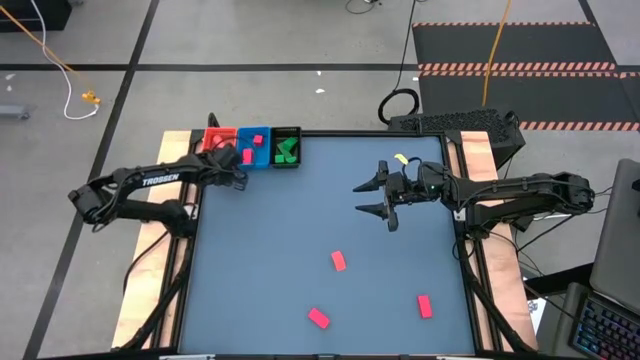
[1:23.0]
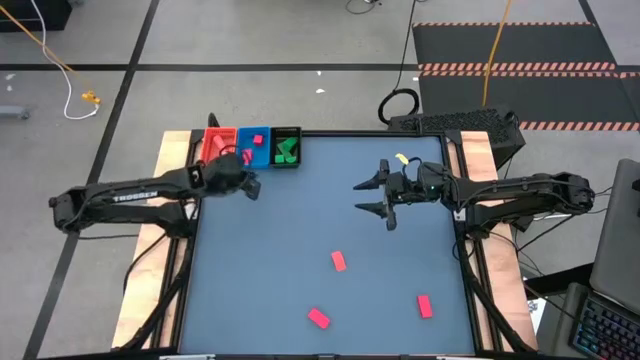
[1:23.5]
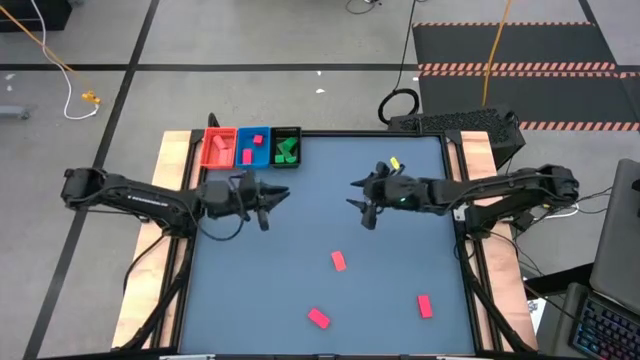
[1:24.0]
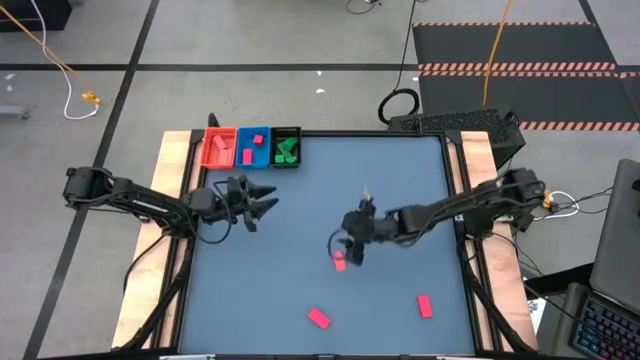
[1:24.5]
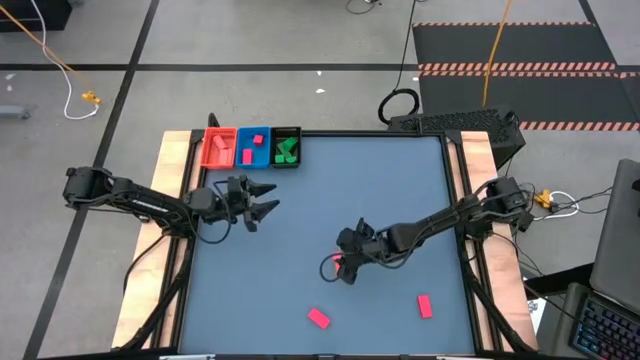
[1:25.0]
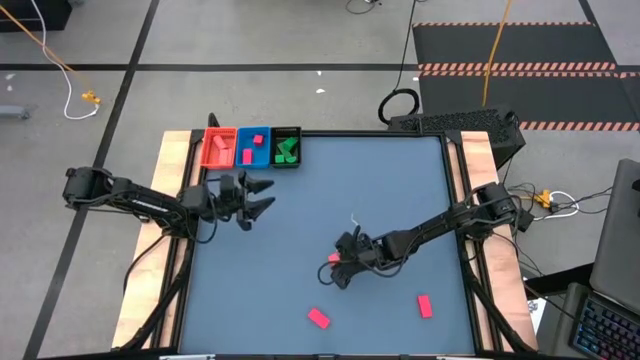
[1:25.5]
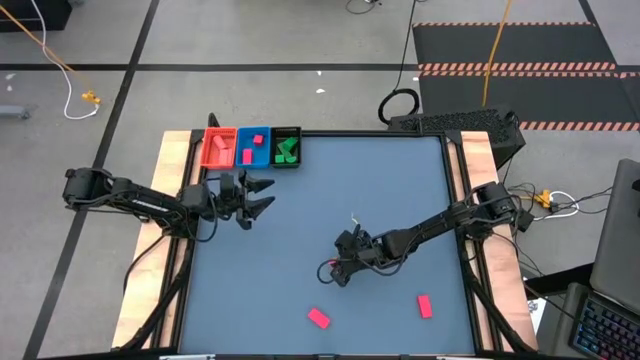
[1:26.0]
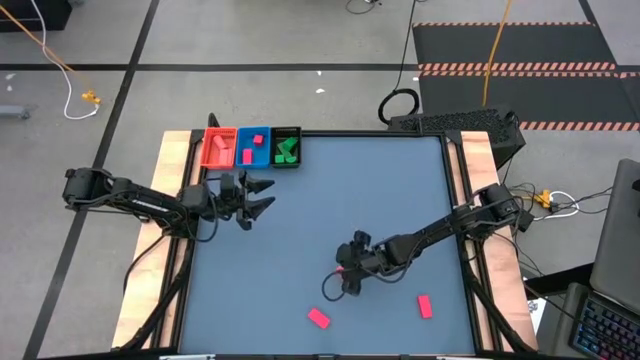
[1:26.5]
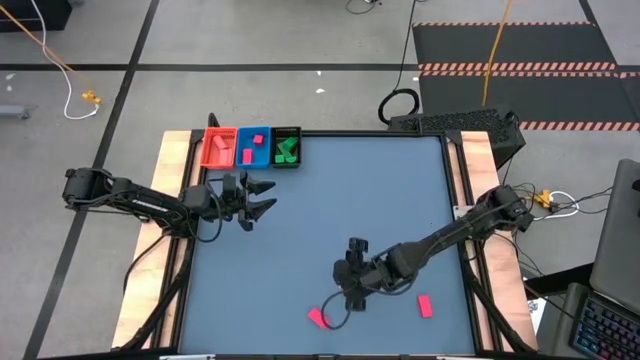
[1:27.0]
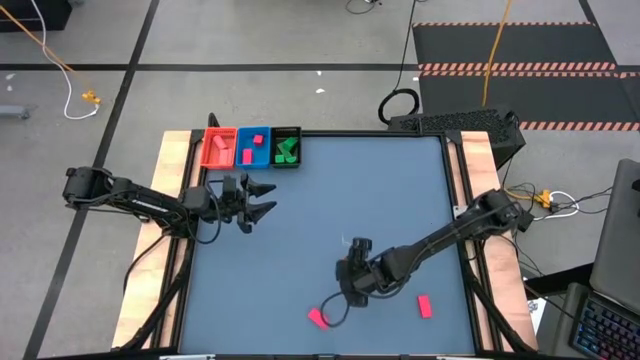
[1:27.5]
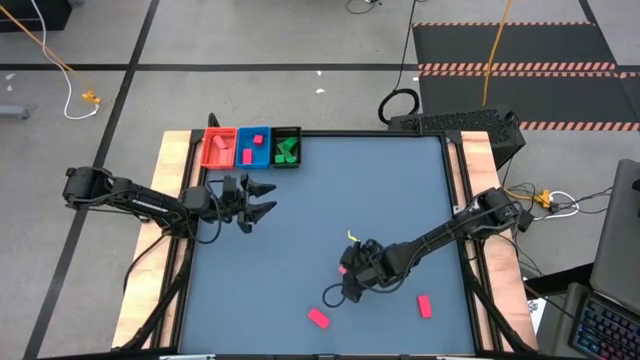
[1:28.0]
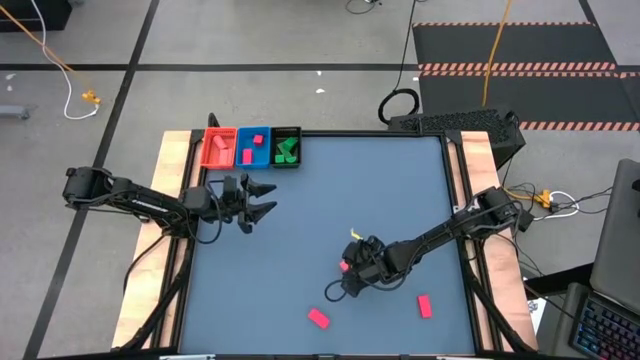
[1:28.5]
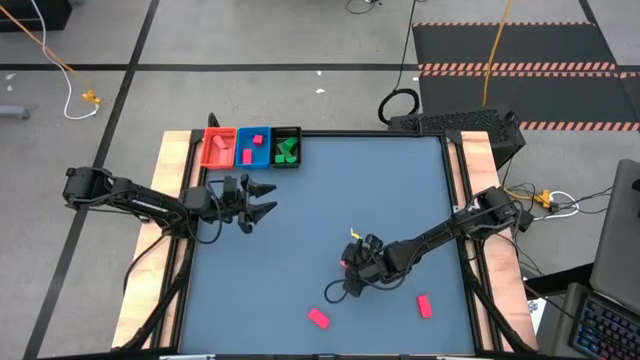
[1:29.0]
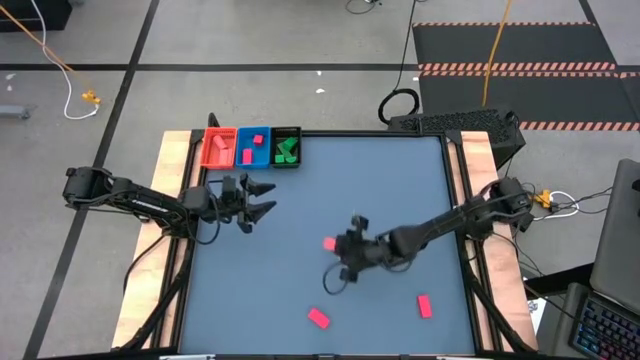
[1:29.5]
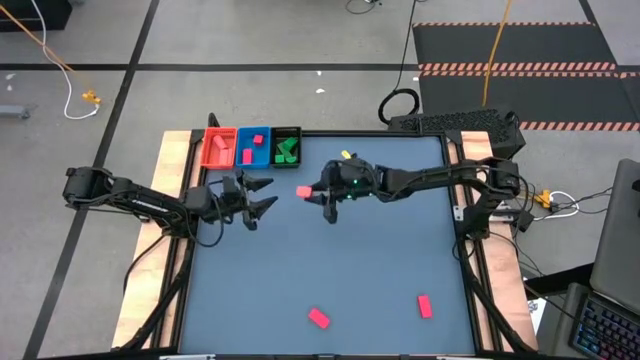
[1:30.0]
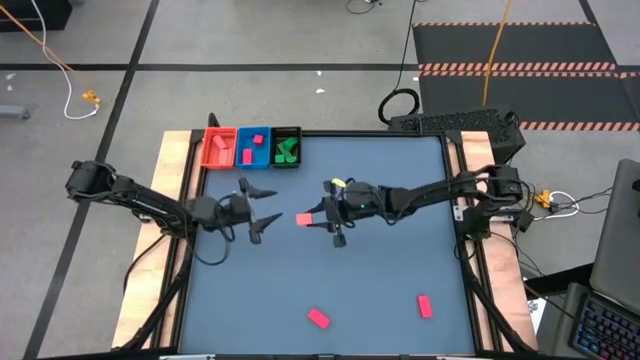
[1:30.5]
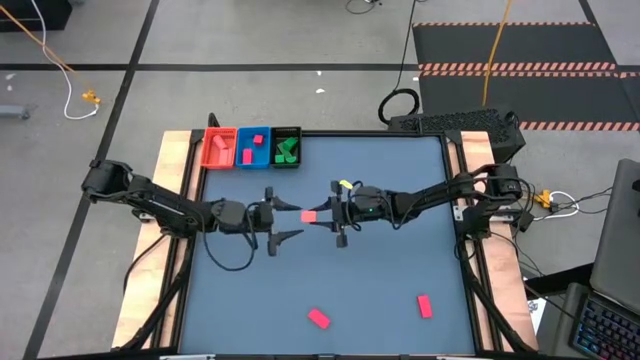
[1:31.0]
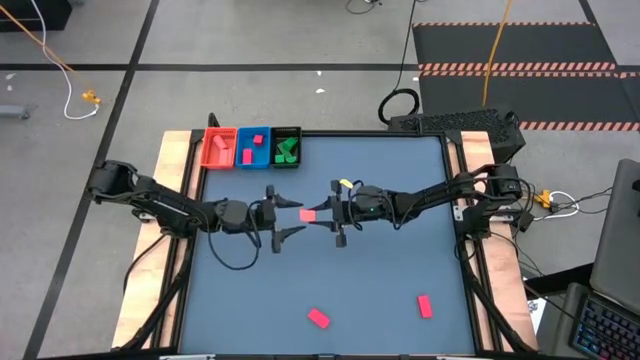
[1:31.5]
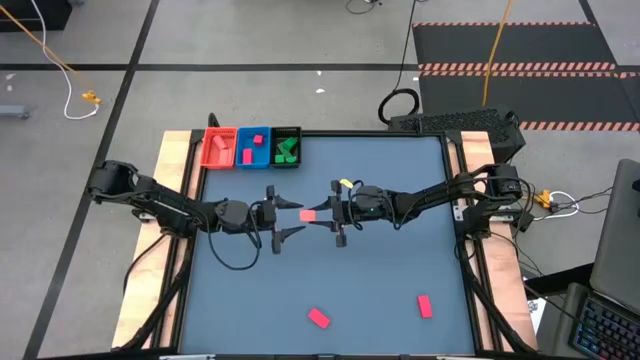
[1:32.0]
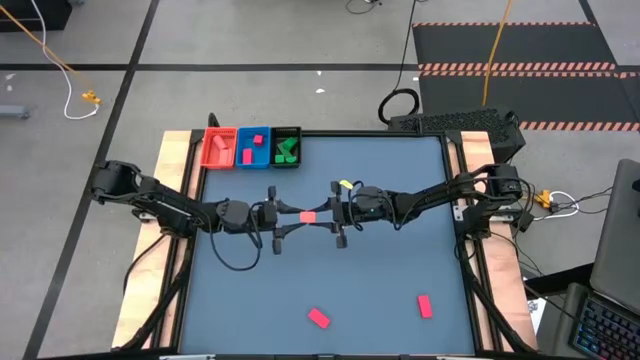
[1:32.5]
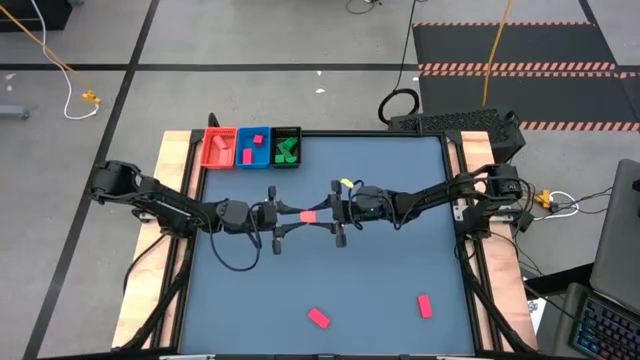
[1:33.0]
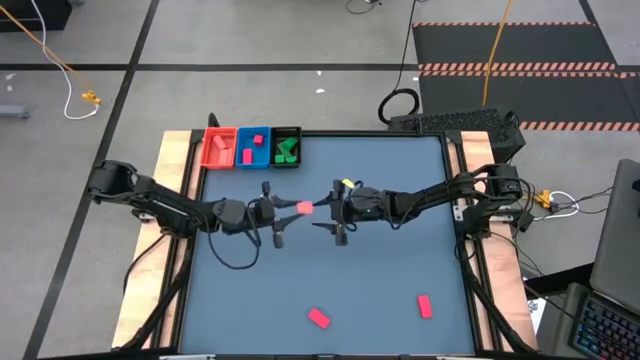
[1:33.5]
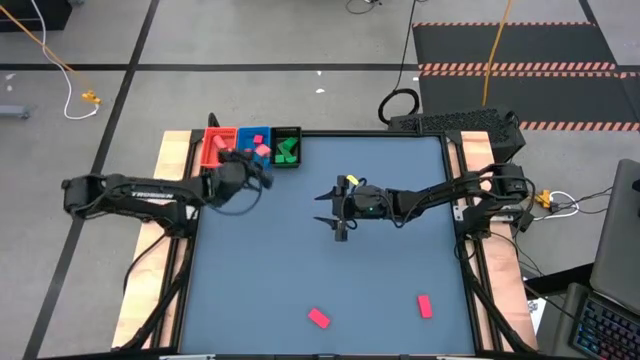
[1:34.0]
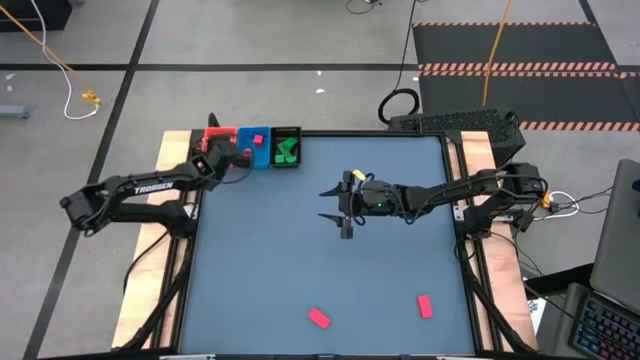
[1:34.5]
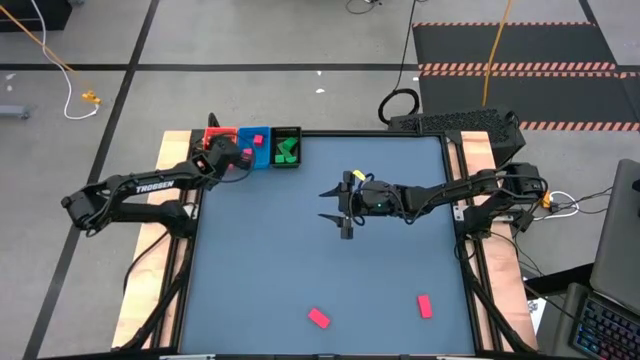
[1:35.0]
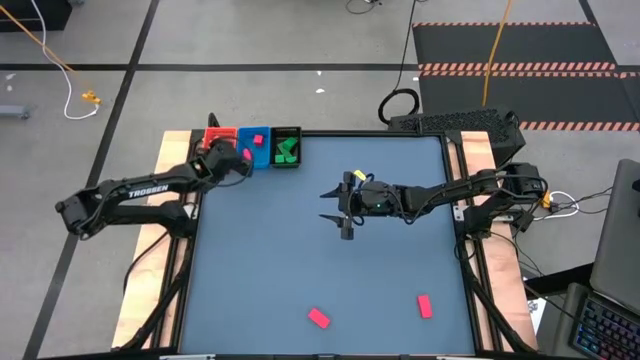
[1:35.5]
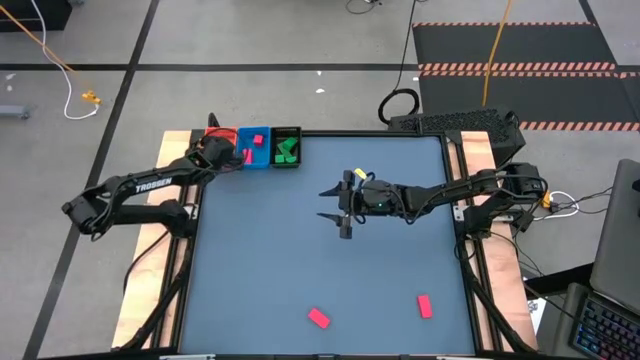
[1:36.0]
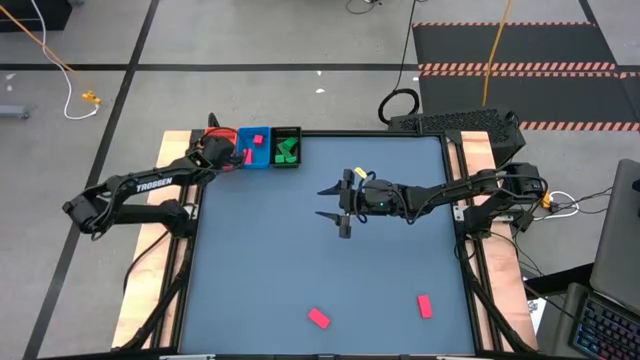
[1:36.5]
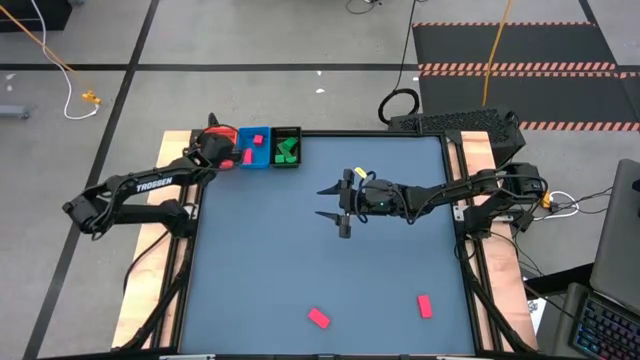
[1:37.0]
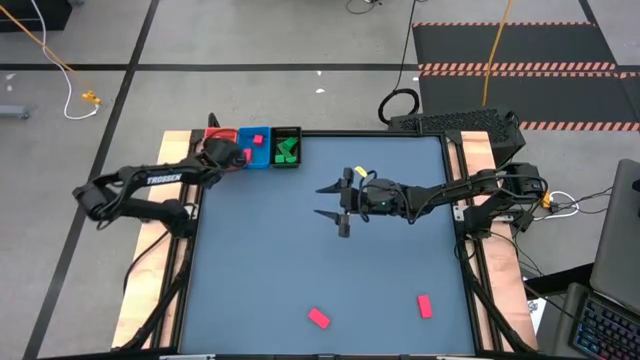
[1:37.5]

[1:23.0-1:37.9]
Task: Sort & place blocks by color
Put the orange block into the orange bin

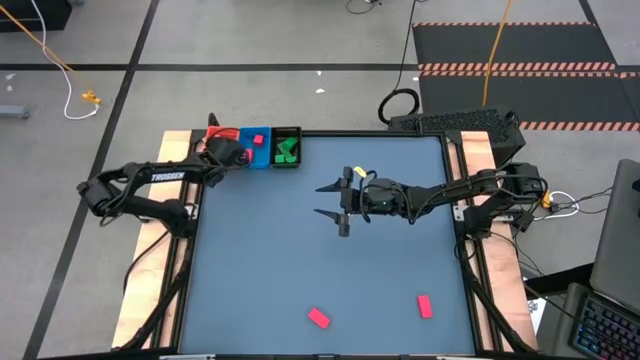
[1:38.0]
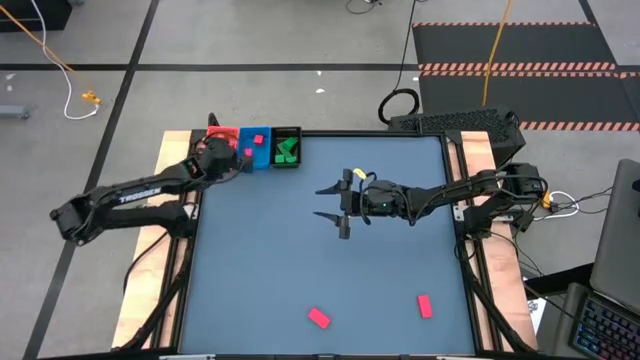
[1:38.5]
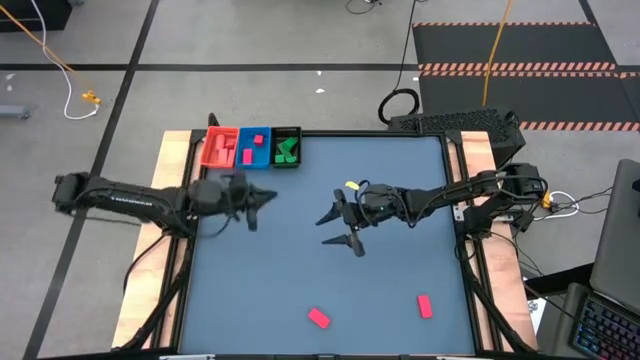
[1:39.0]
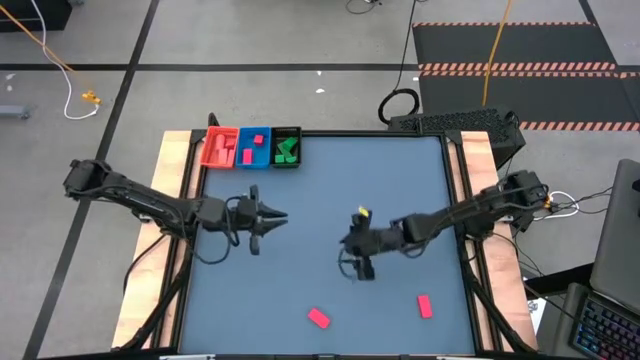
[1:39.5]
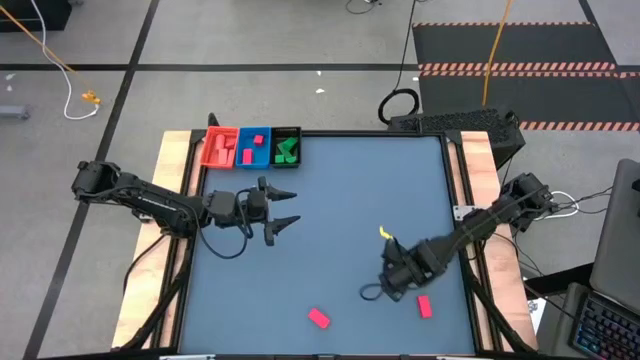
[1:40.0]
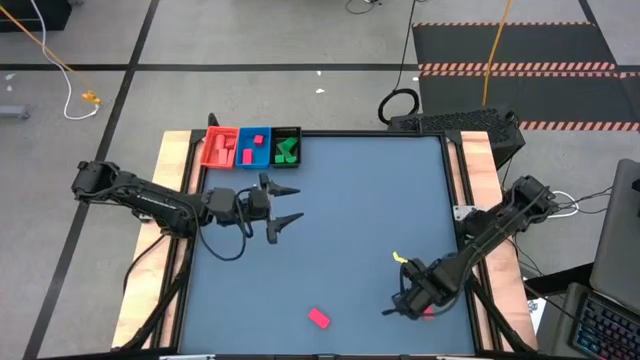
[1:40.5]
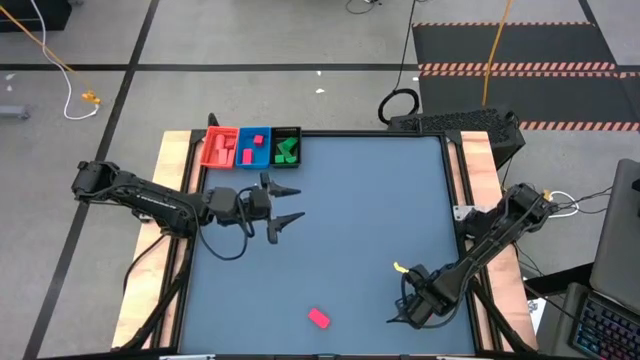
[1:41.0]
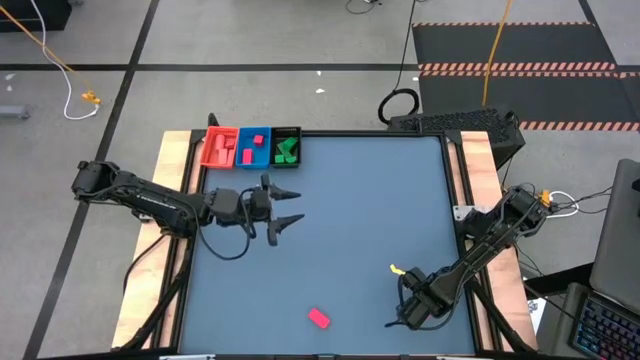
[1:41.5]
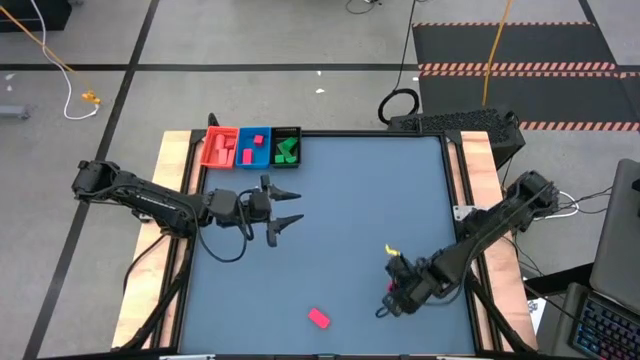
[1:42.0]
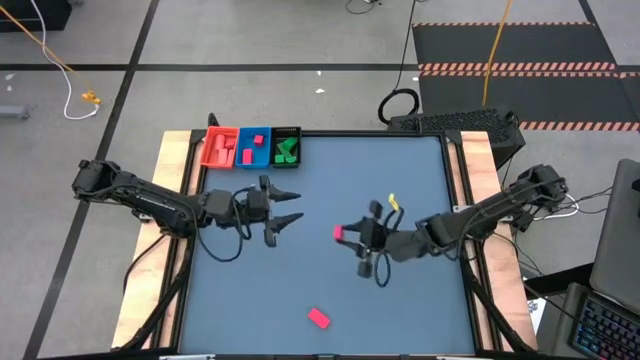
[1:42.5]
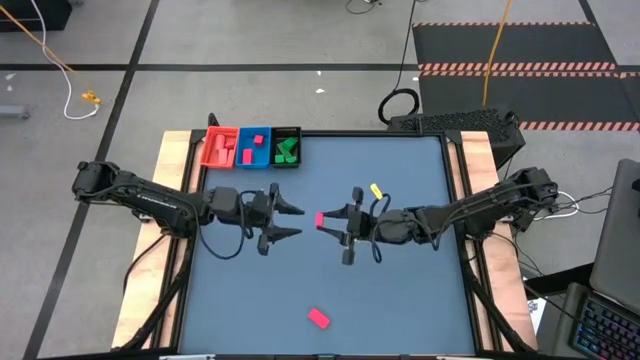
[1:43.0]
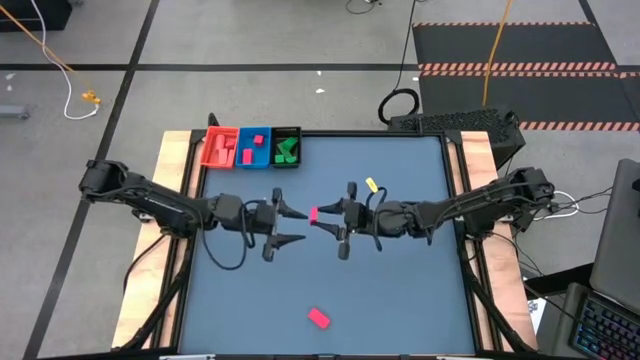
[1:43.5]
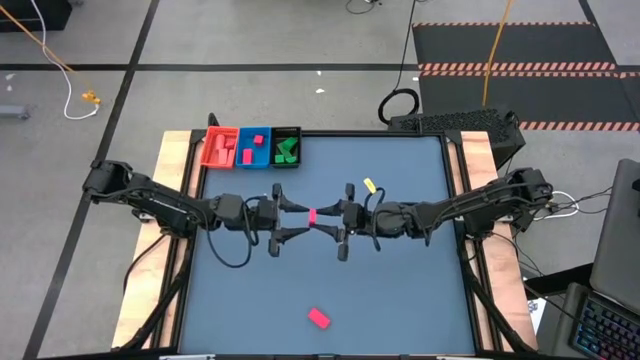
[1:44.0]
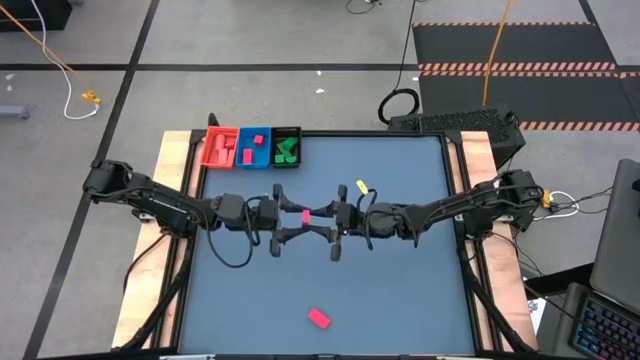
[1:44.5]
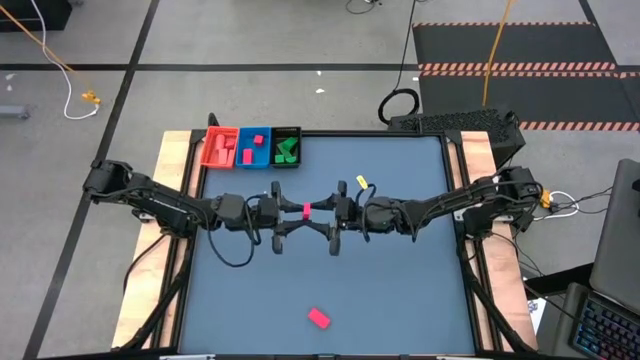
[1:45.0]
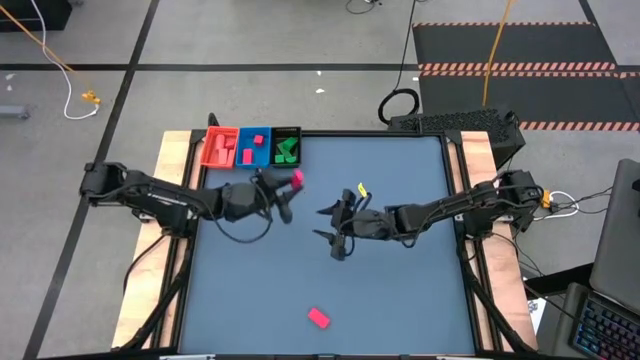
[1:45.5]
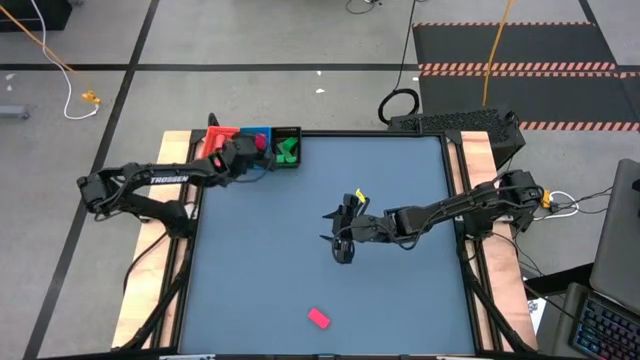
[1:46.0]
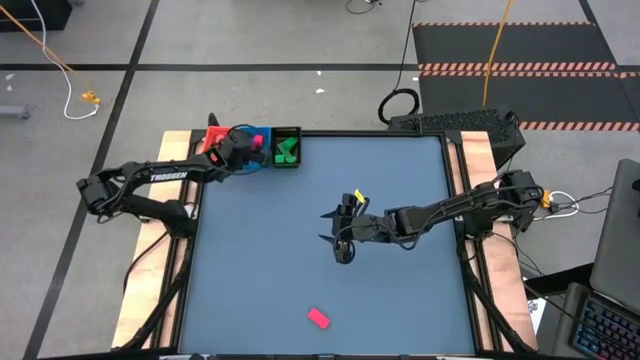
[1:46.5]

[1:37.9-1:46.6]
Put the red block into the blue bin
